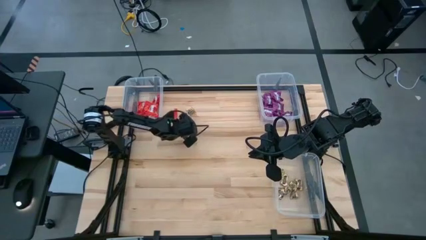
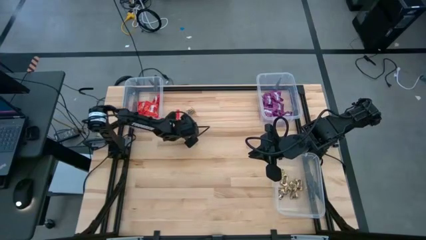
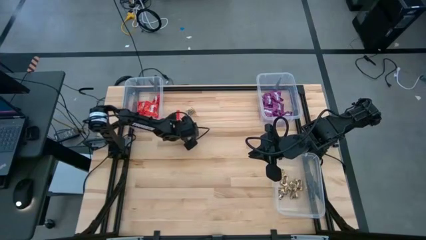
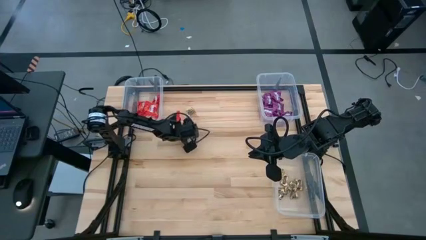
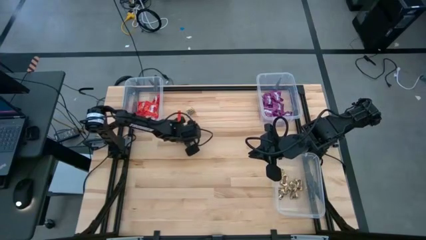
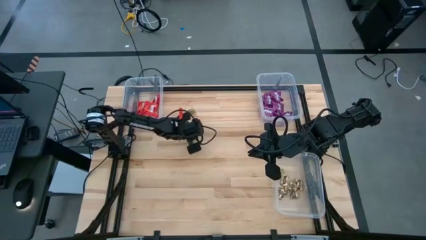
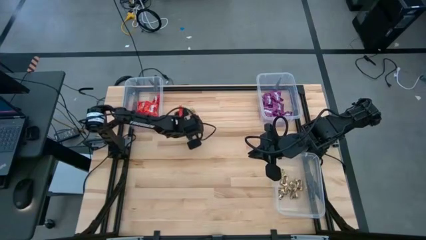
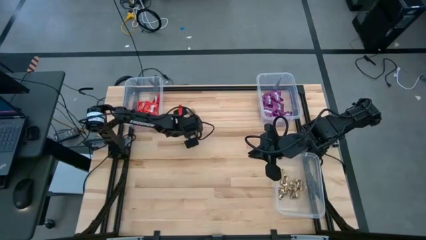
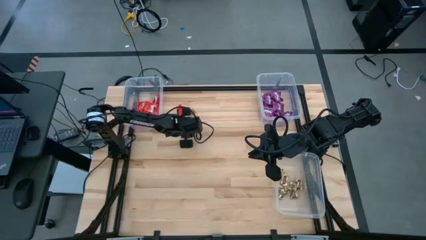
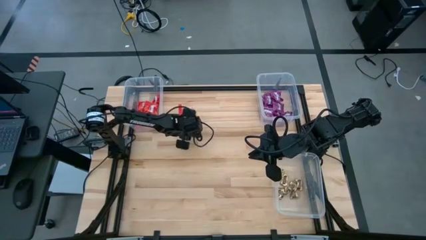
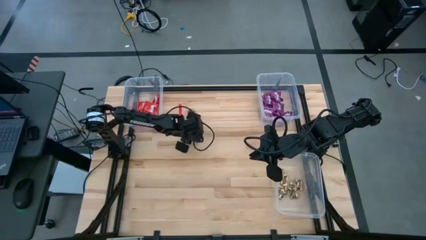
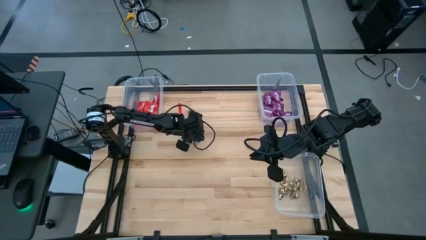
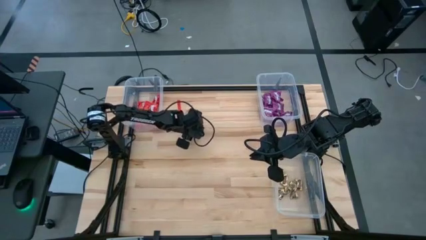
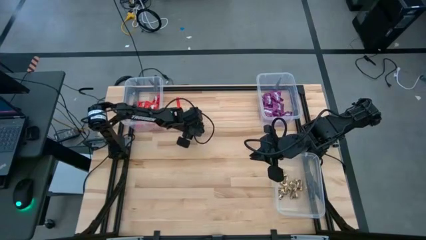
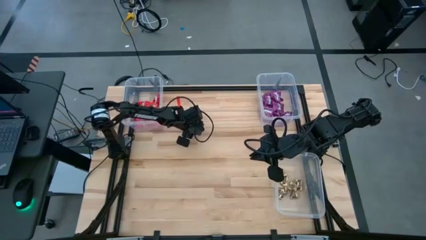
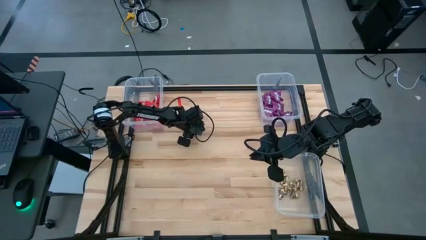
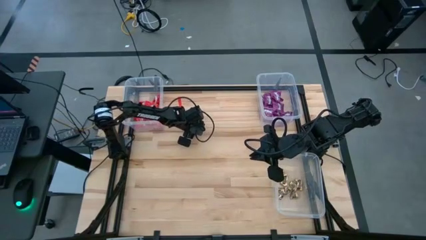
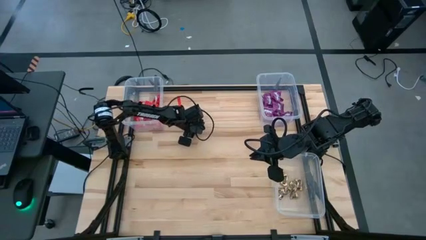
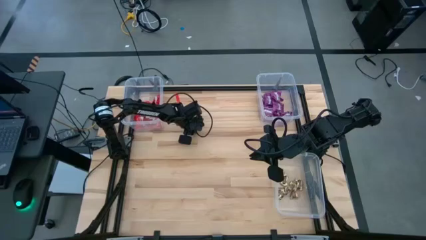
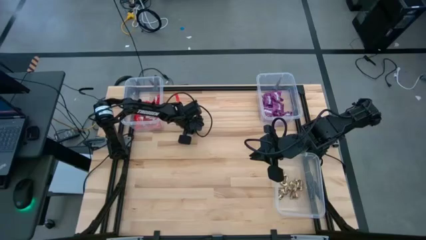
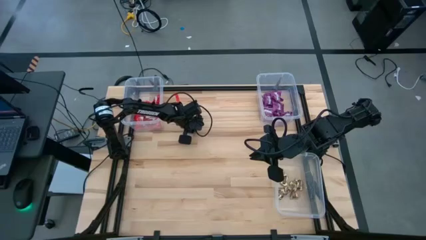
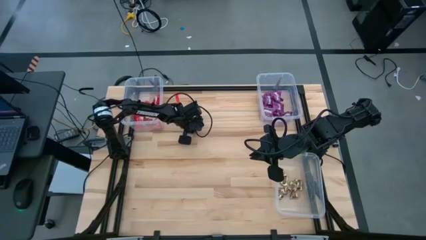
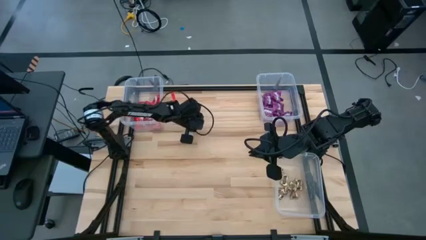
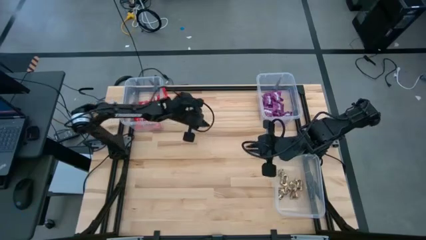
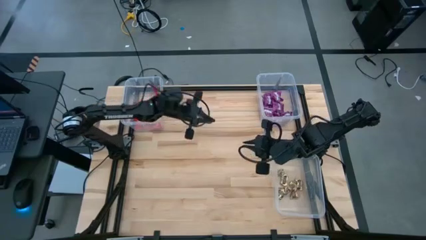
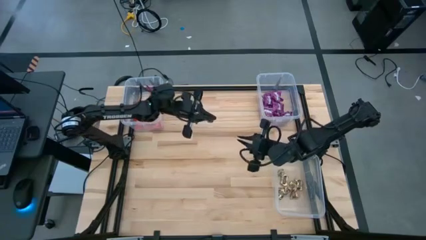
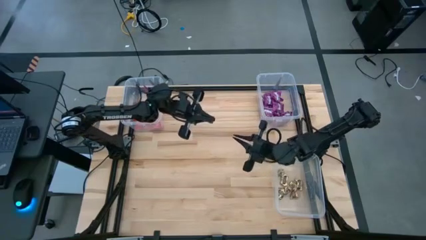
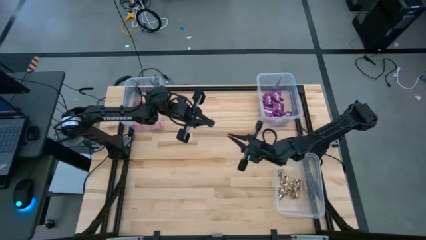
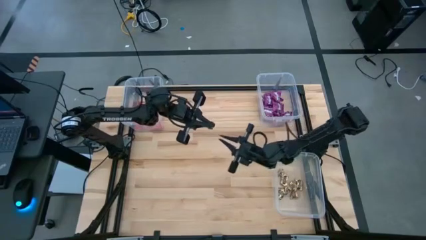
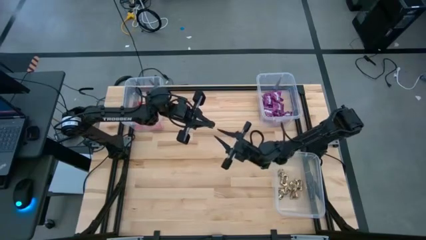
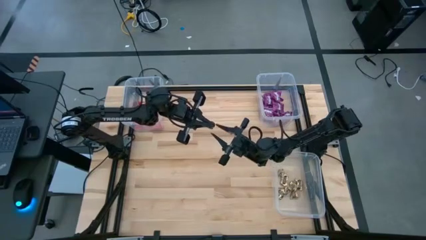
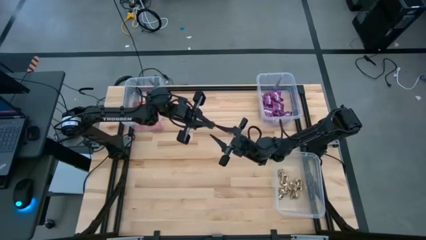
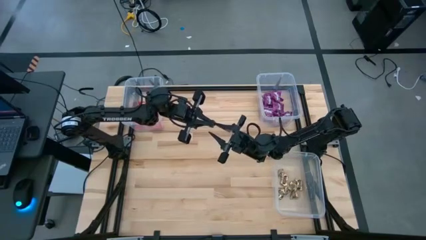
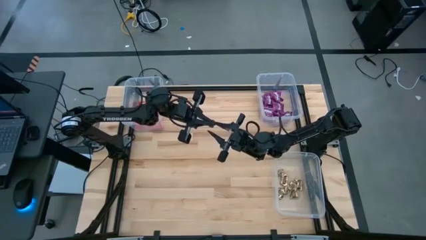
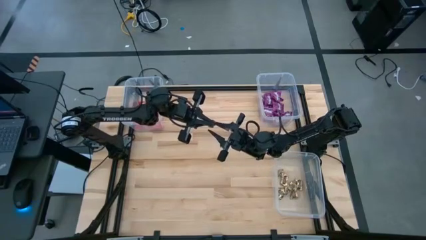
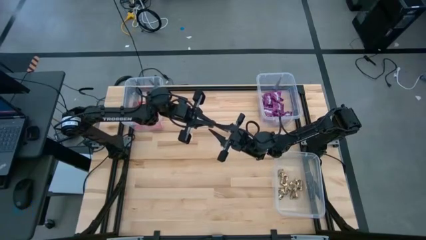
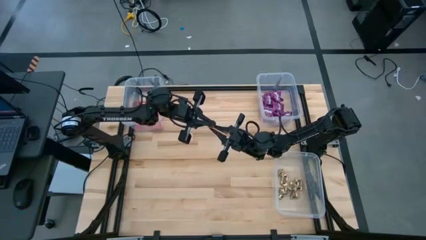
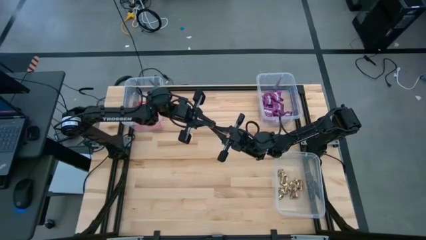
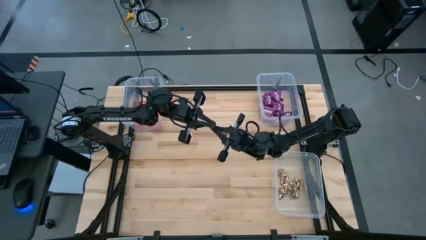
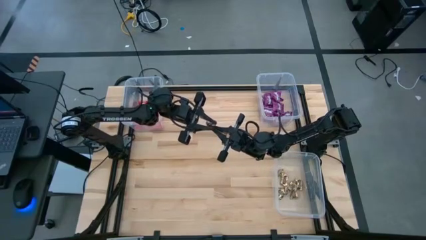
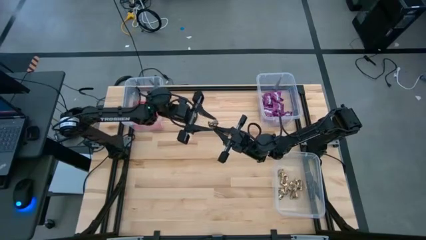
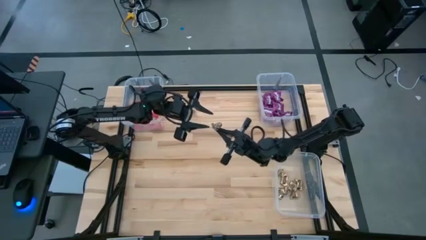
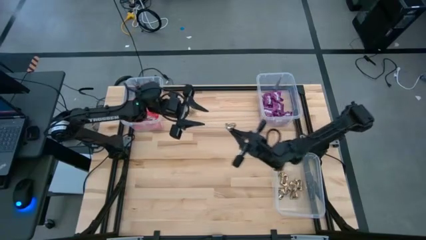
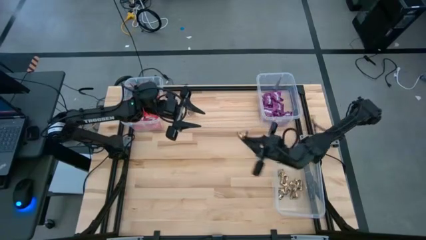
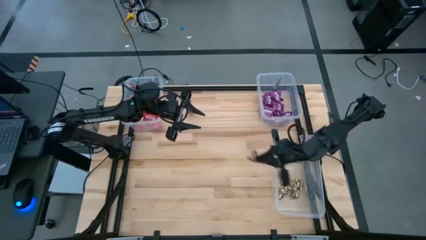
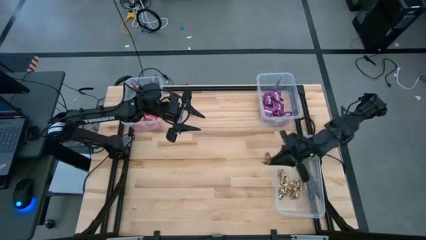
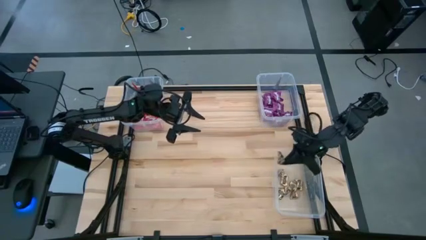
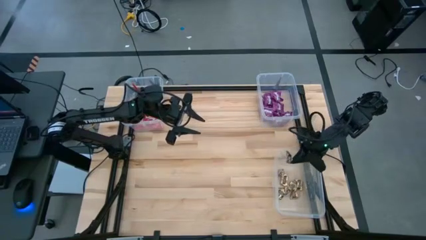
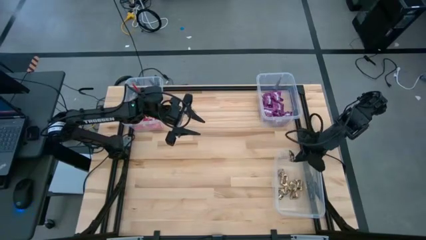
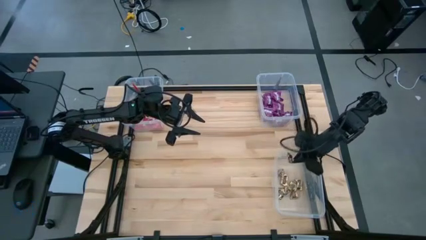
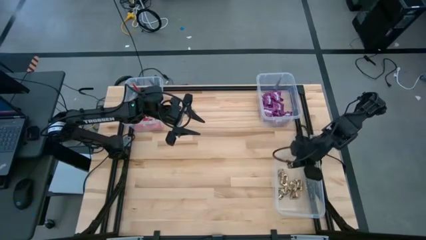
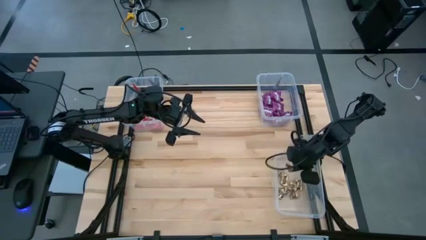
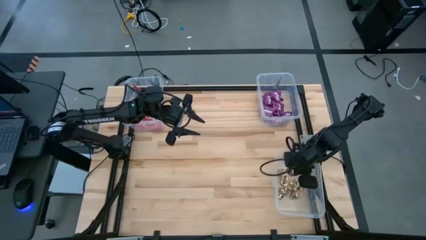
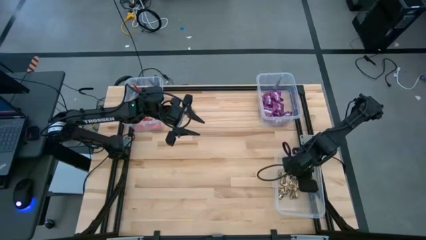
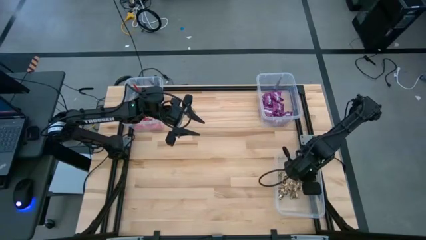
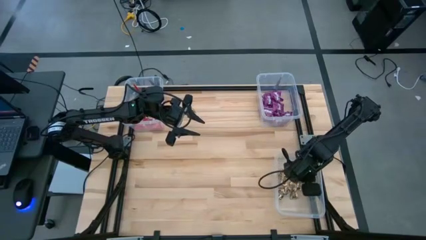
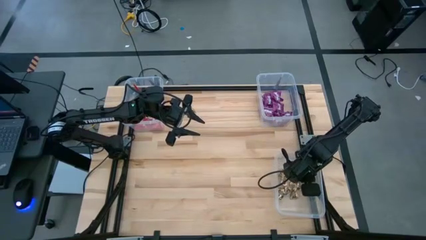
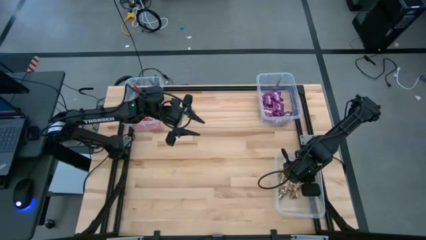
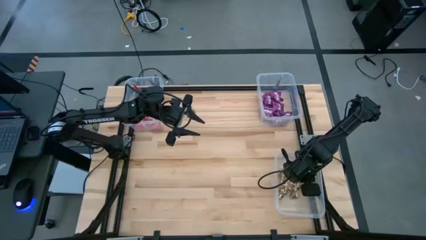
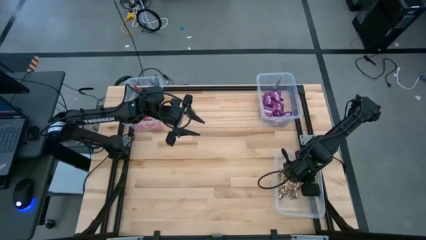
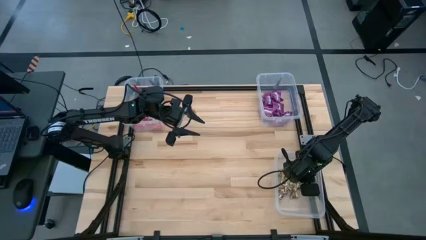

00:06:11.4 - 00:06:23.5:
Task: Sort candy
Put the yellow candy into the bottom right transparent bin

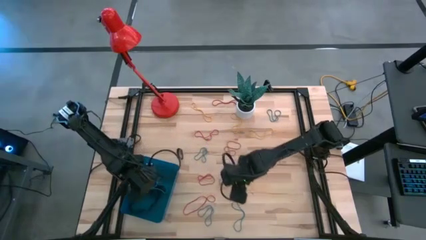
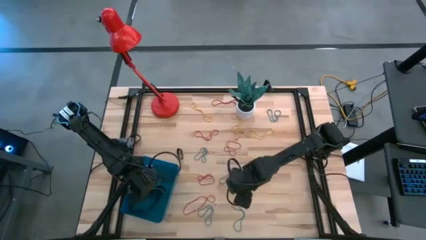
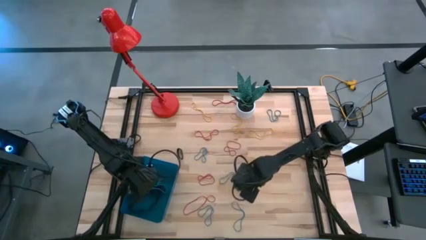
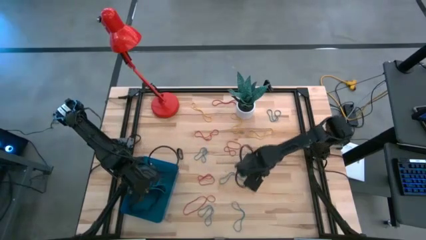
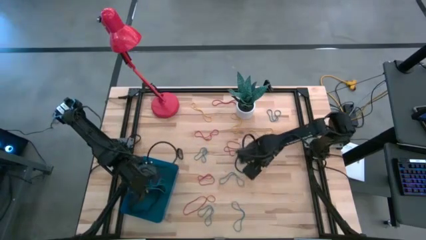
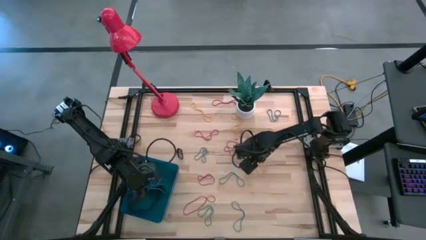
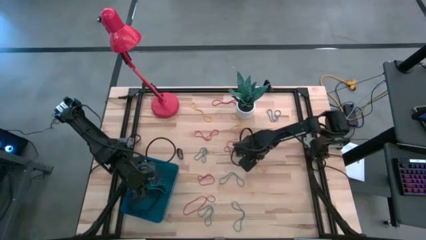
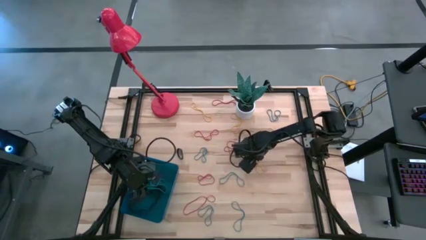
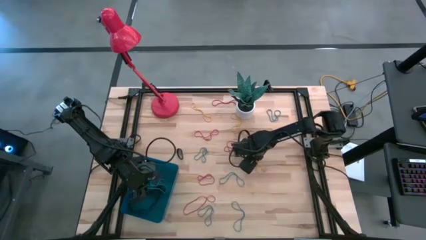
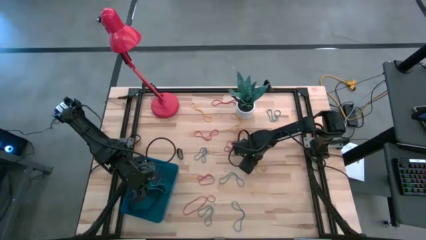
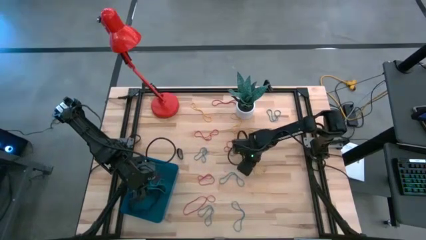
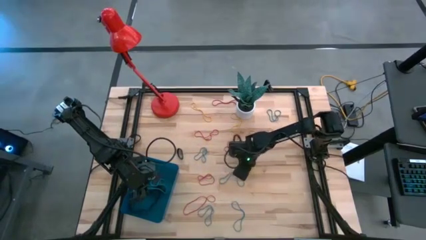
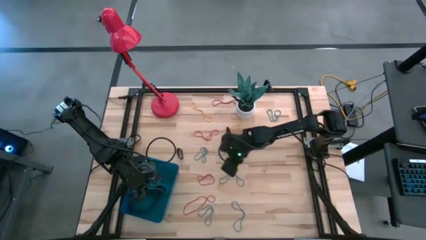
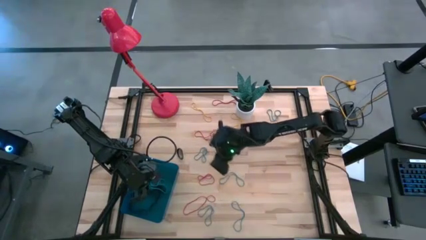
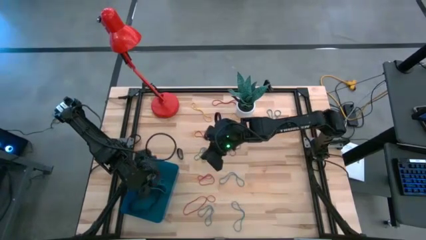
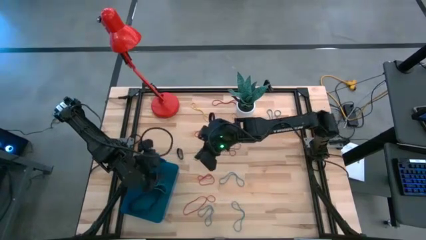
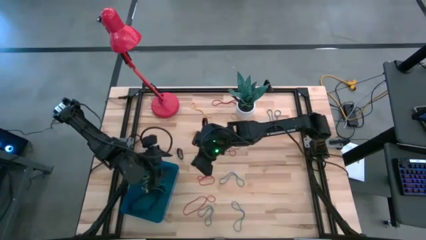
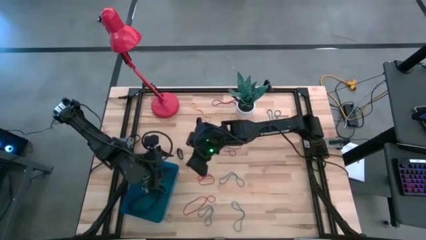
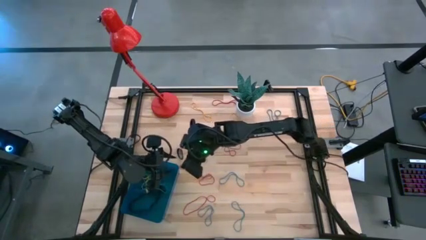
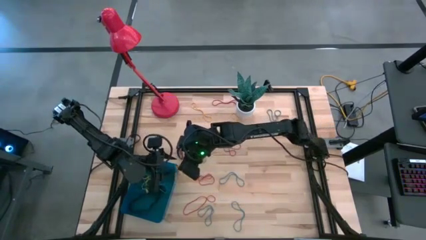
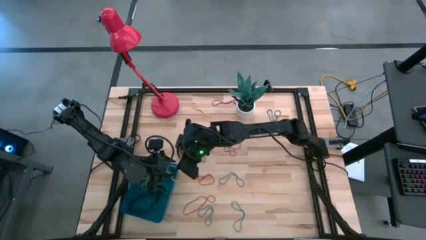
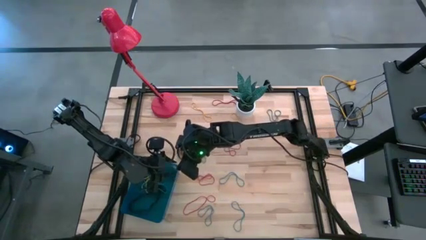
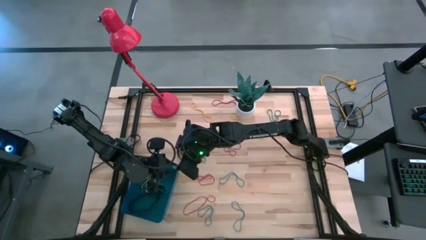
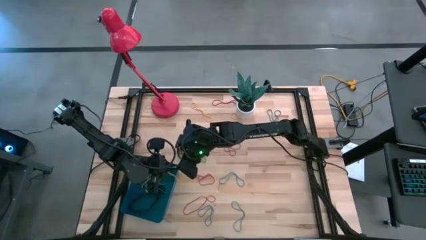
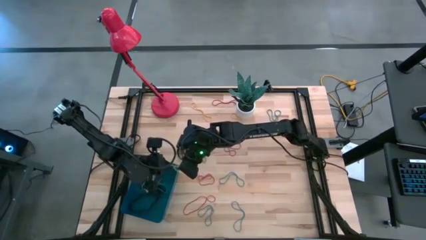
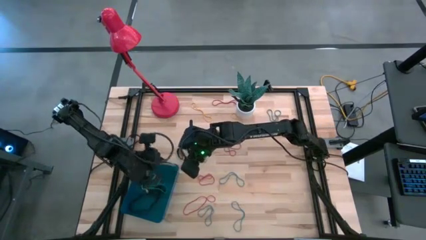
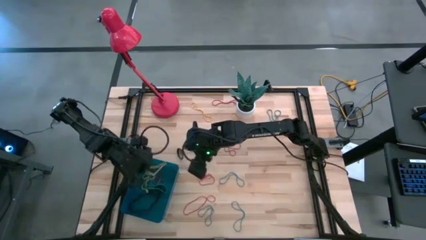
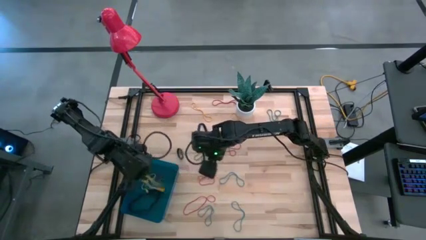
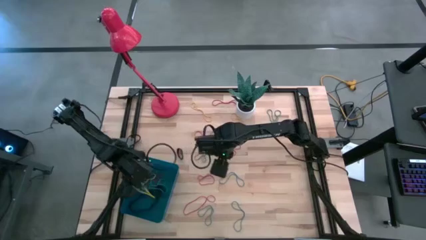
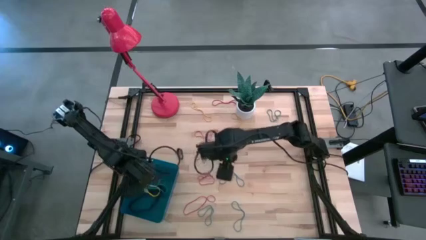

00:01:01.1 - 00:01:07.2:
Task: Pick and place rubber bands into bin
Put the yellow rubber band into the blue bin
